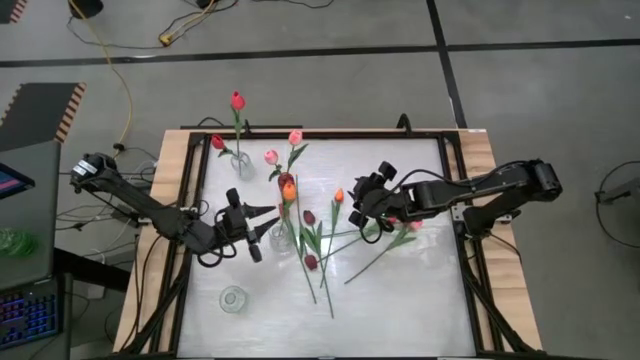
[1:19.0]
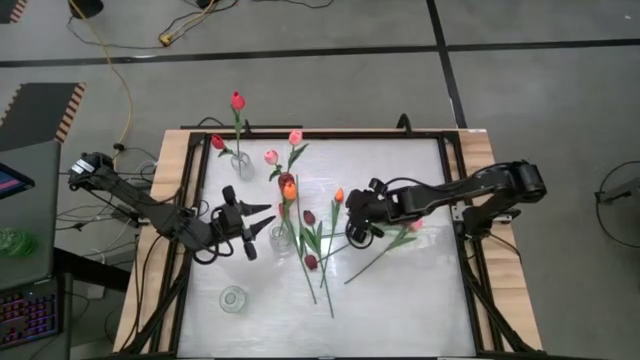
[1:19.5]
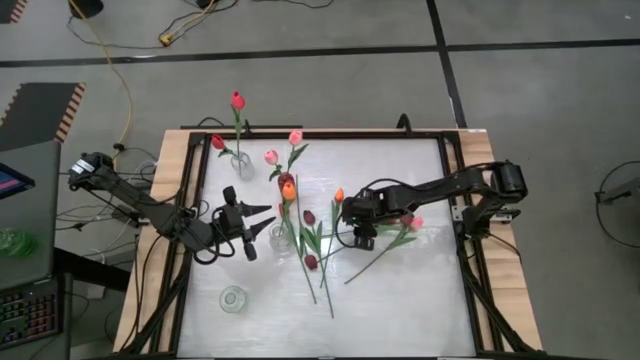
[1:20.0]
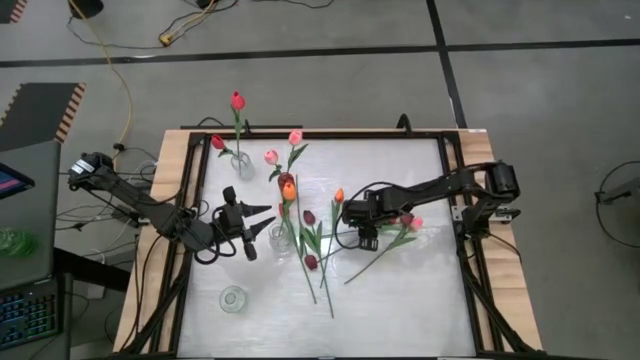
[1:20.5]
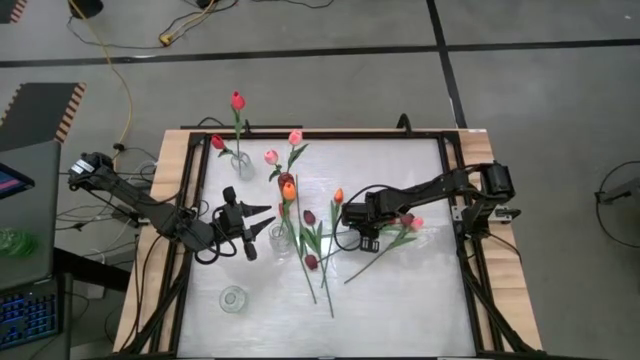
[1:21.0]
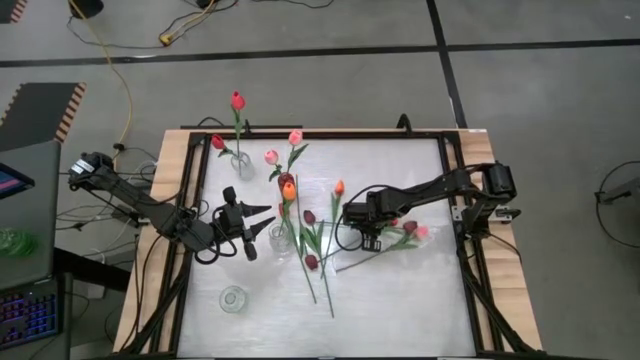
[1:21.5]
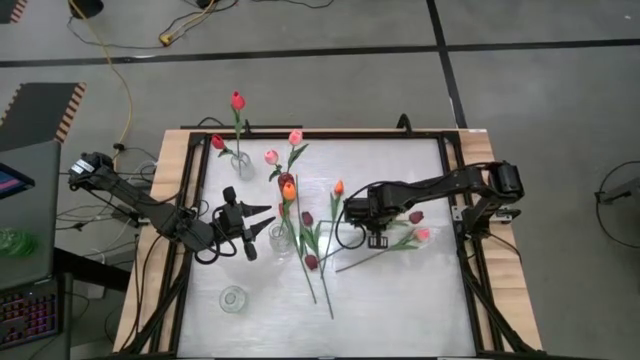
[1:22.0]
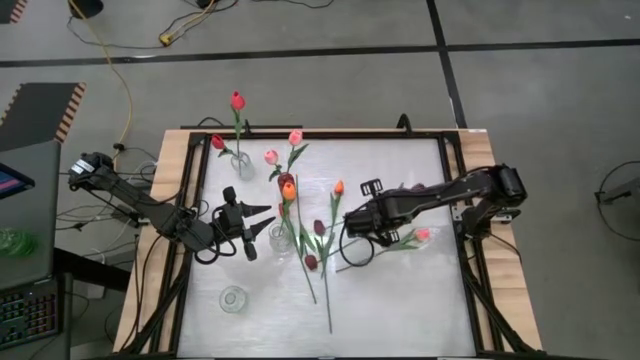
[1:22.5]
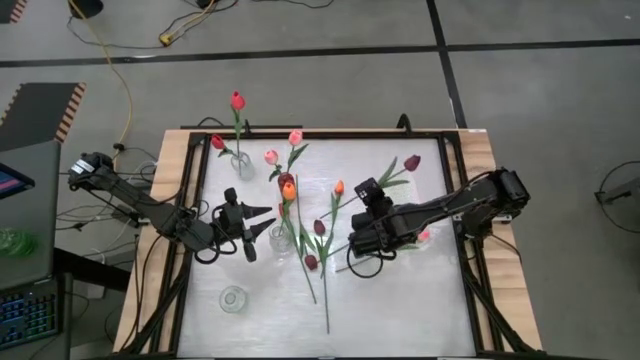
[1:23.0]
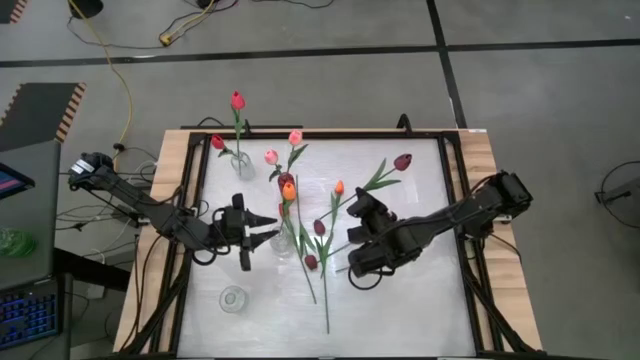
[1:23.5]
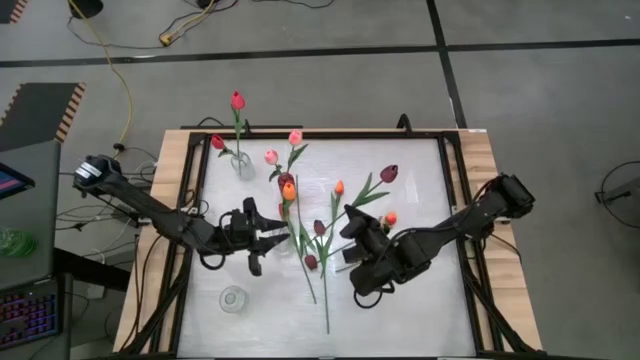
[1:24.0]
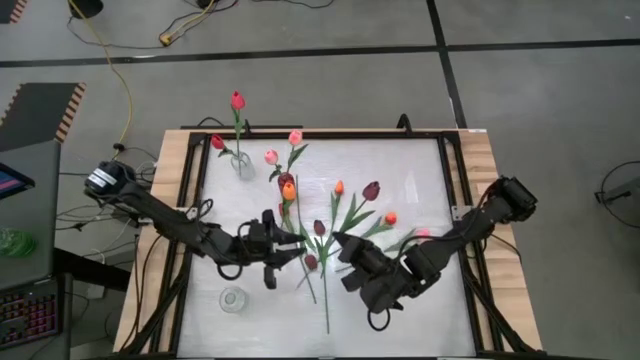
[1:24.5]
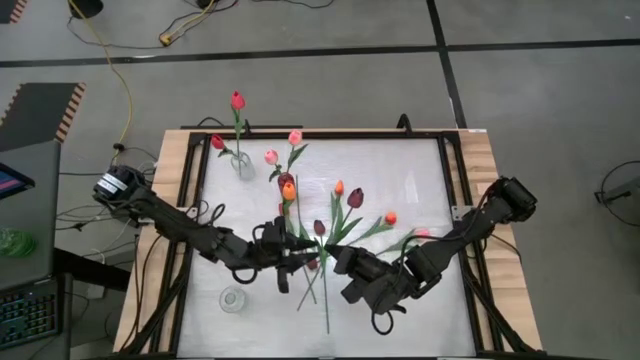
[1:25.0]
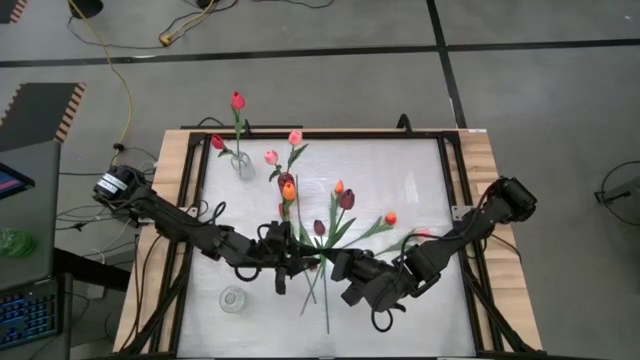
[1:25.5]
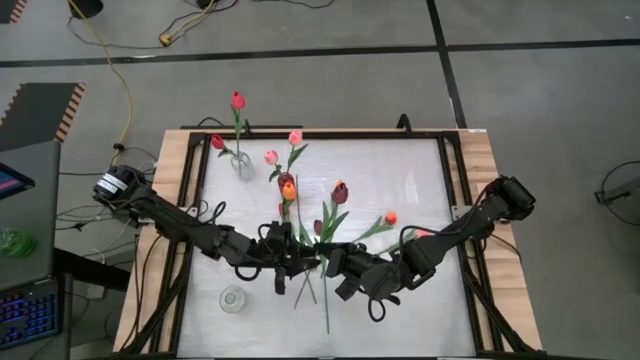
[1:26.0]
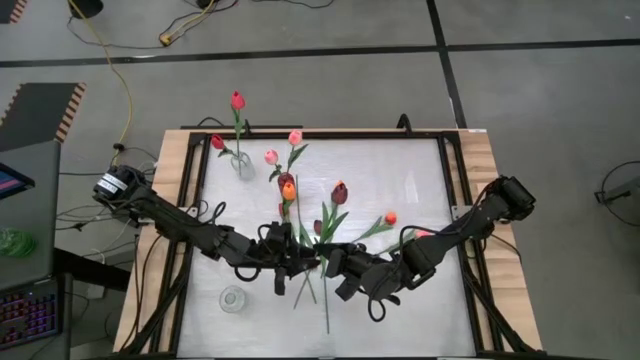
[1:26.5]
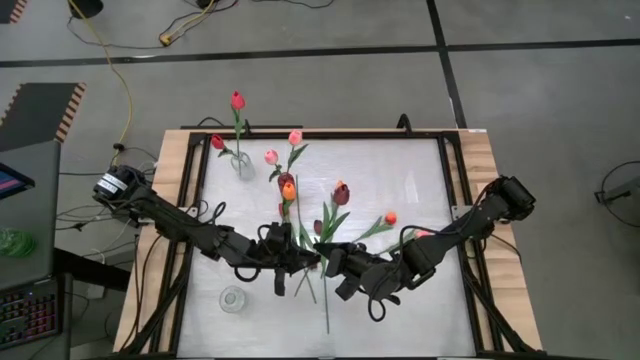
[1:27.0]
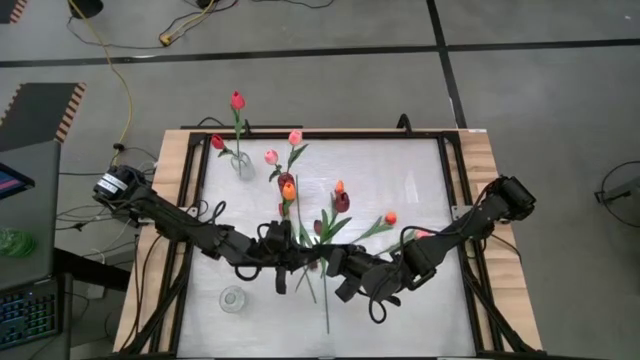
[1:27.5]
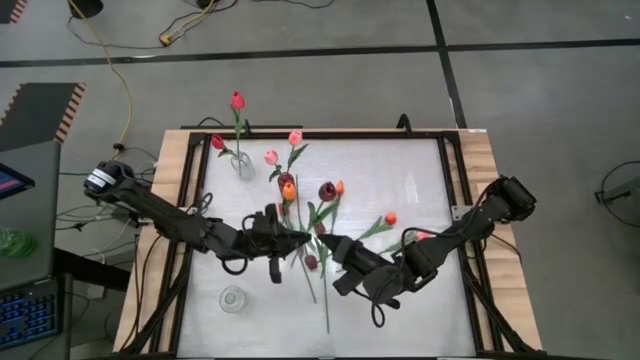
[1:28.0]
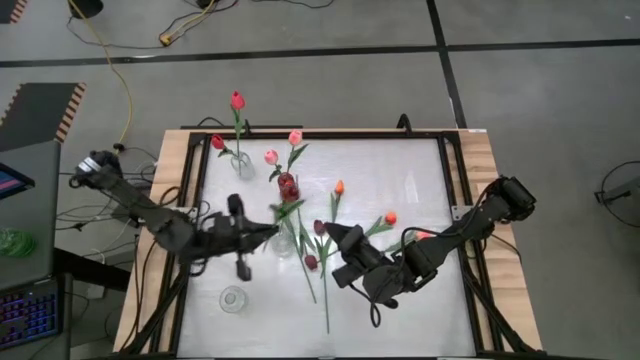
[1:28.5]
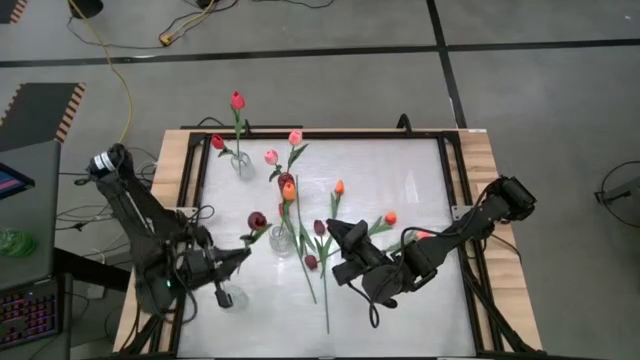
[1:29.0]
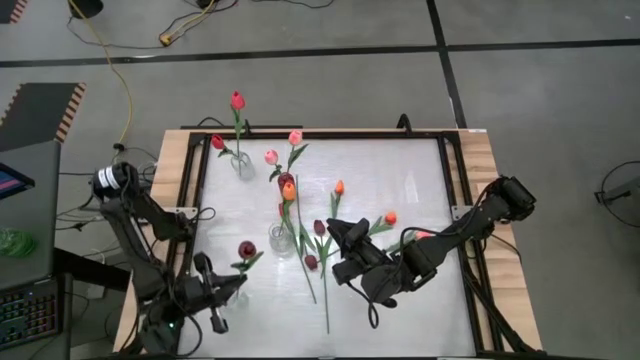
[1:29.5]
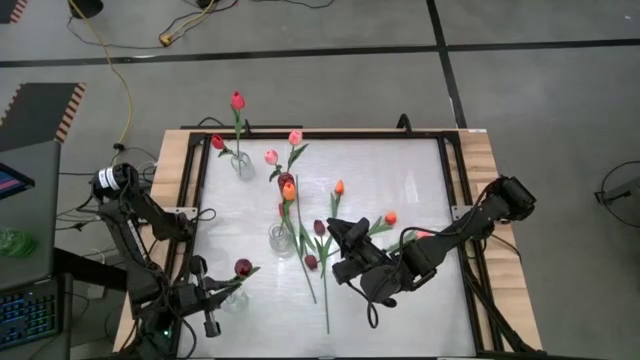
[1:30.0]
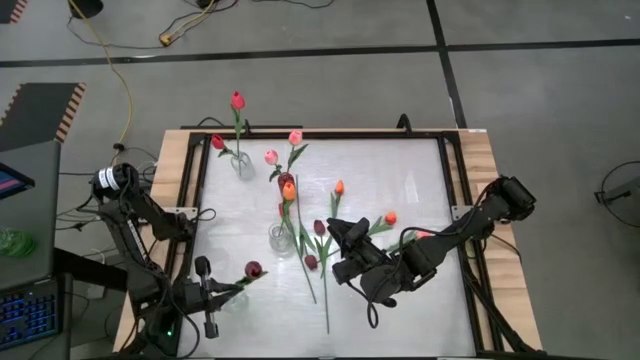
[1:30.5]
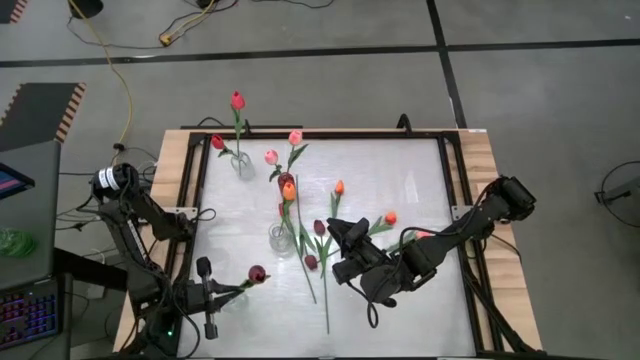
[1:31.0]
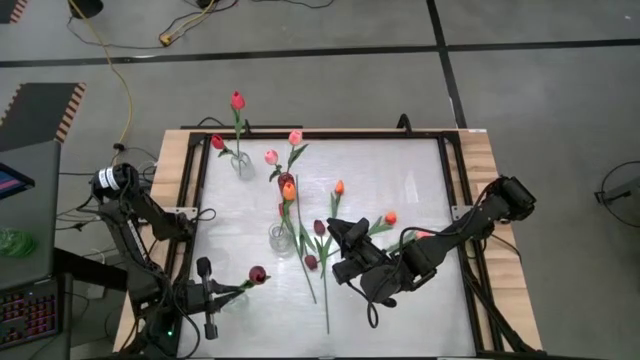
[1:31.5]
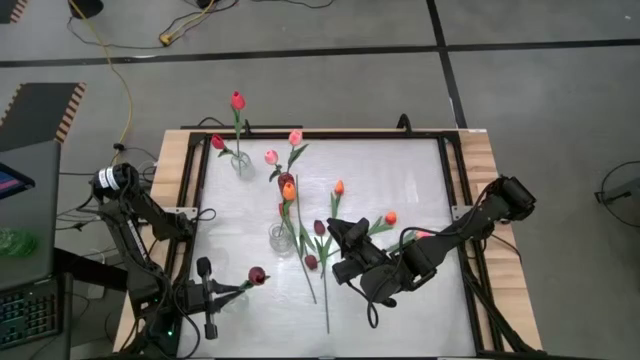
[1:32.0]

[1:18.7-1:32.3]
Task: Sort flowers into vase by color
Put the dark red tulip into the bottom transparent vase

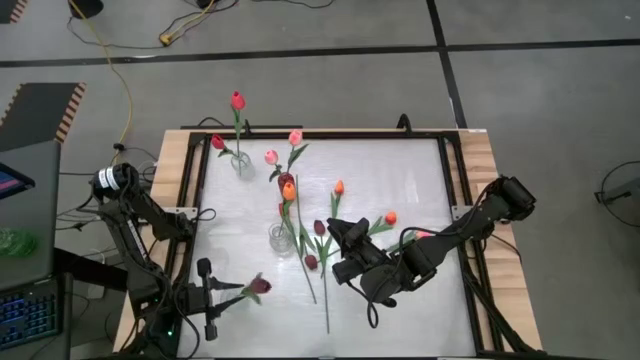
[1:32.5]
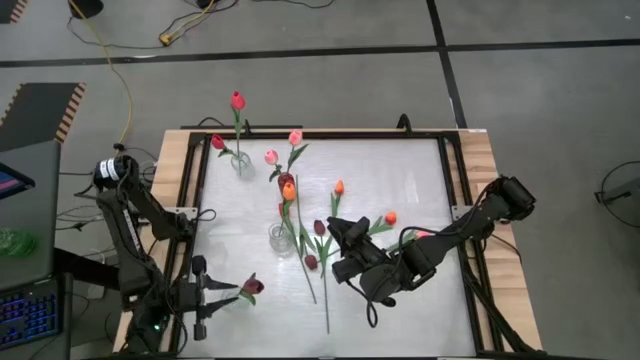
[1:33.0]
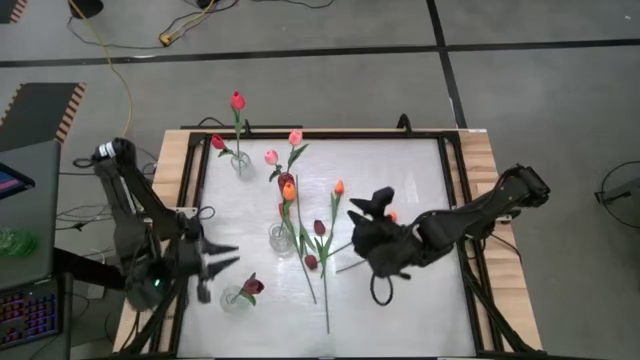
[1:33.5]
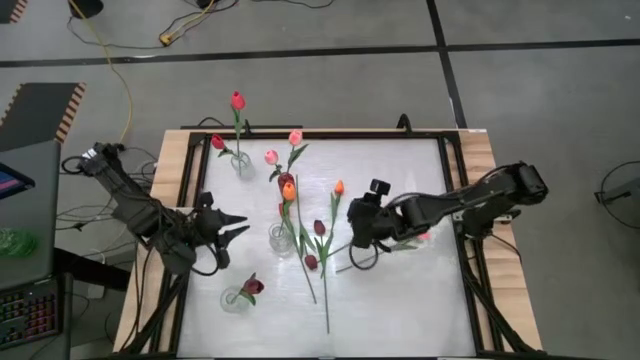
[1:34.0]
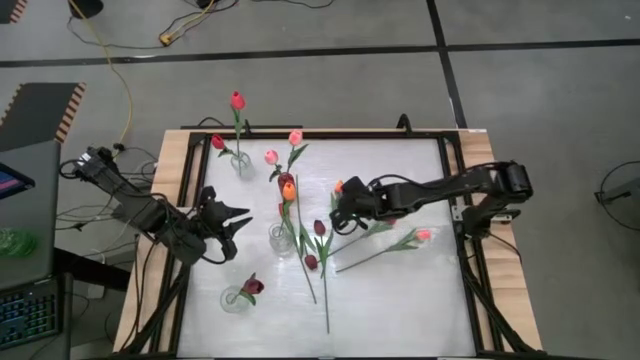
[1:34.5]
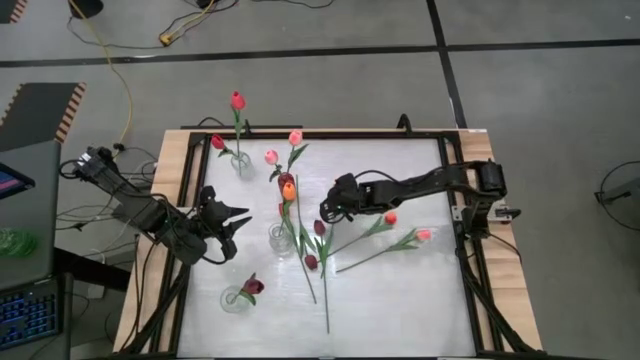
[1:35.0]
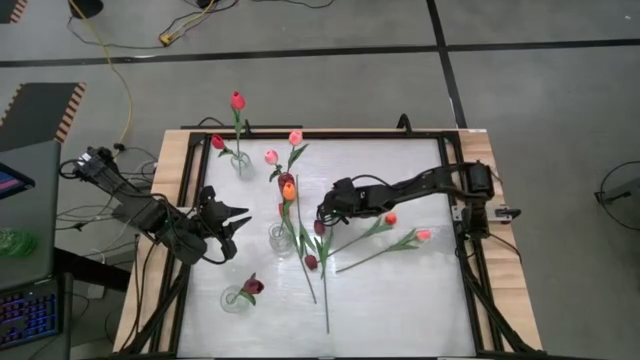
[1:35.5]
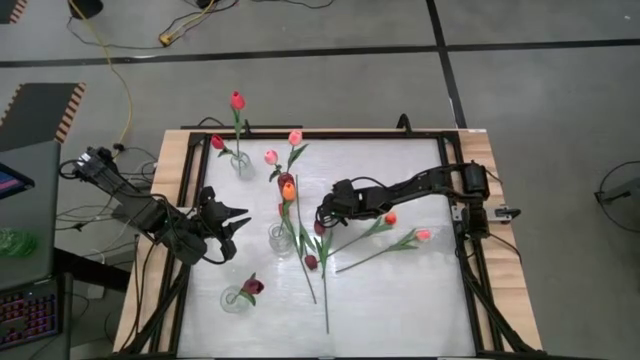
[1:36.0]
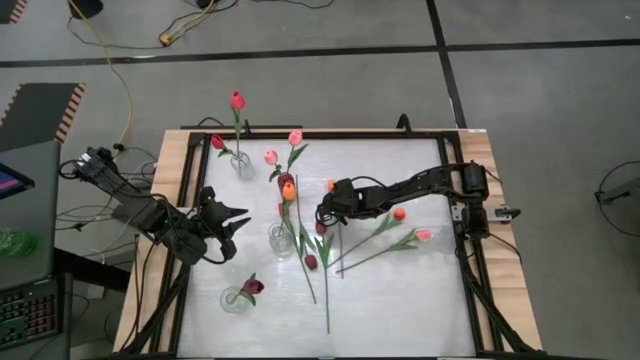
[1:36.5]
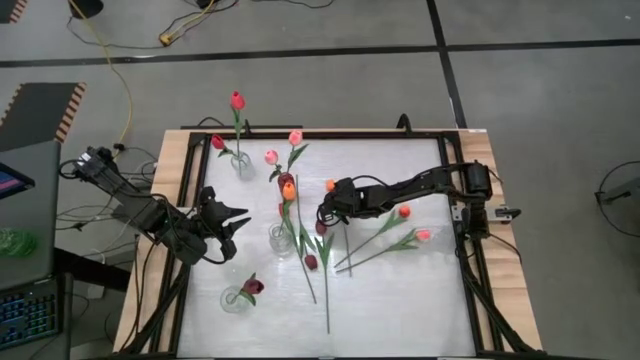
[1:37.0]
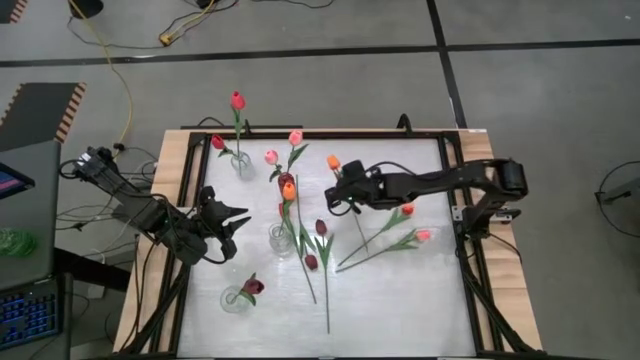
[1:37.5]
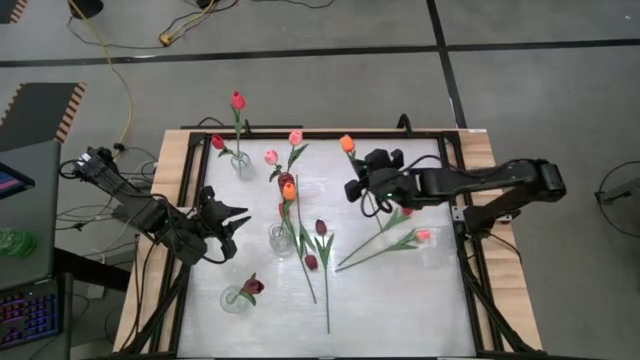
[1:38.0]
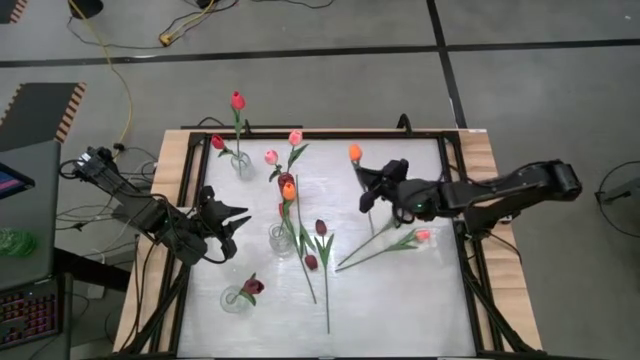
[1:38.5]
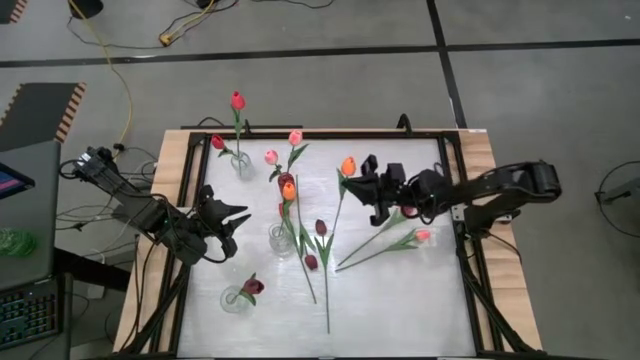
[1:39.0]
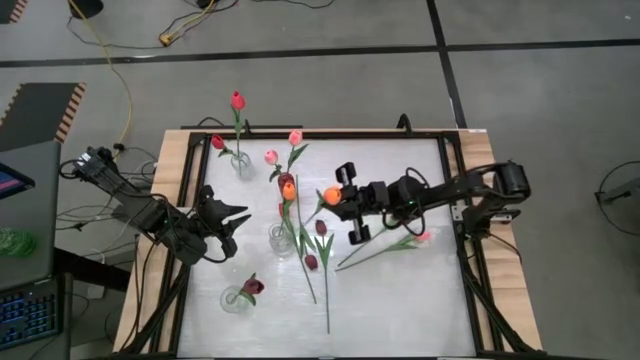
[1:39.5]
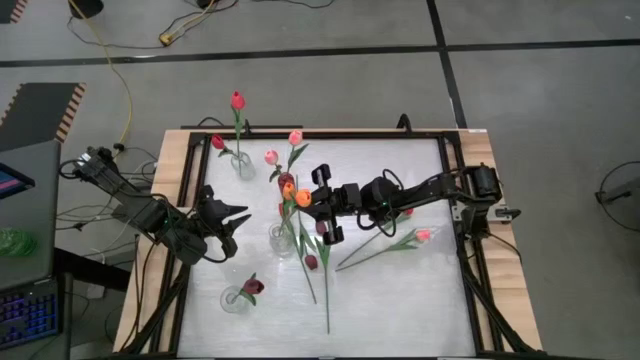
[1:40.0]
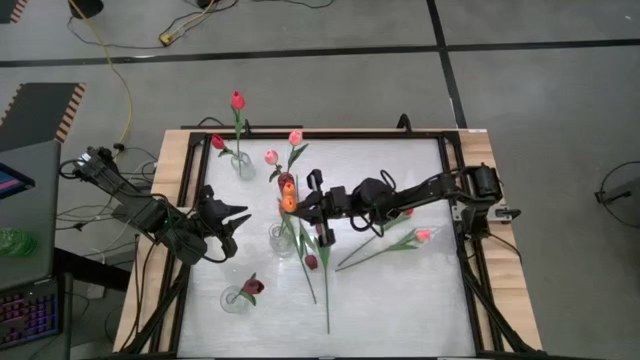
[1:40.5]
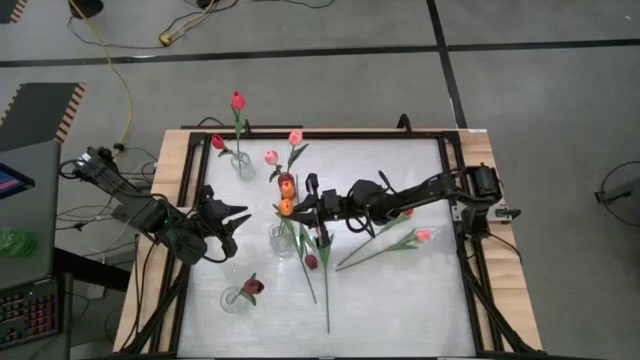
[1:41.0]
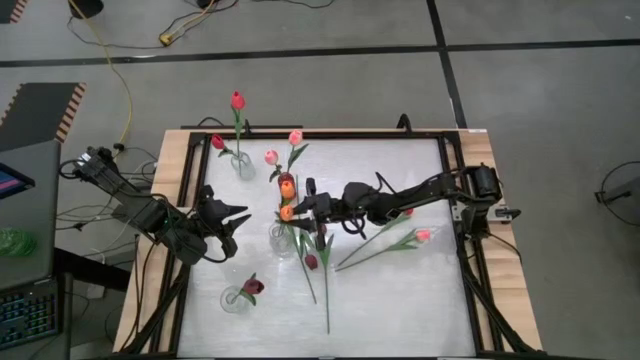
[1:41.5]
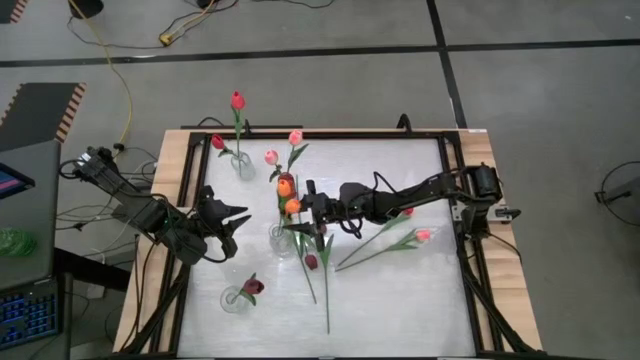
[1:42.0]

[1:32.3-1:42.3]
Put the orange tulip into the middle transparent vase
